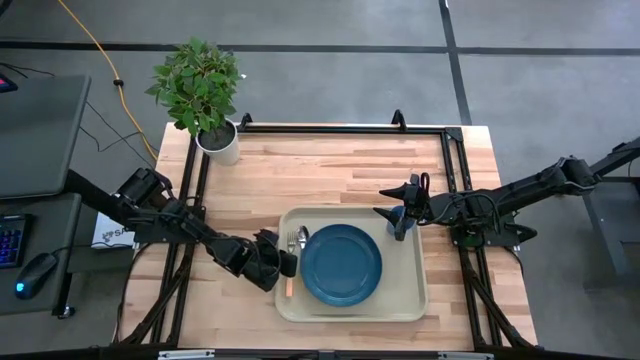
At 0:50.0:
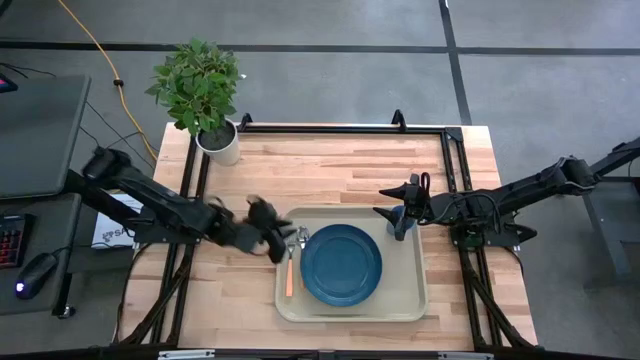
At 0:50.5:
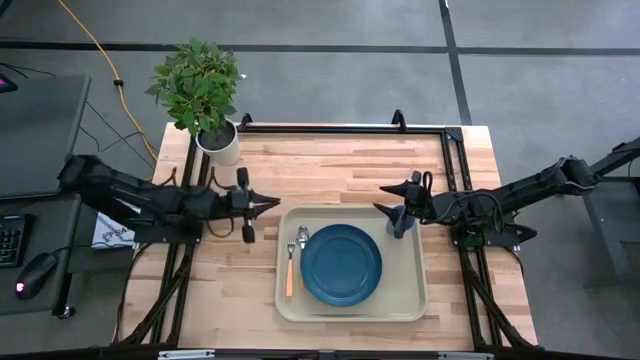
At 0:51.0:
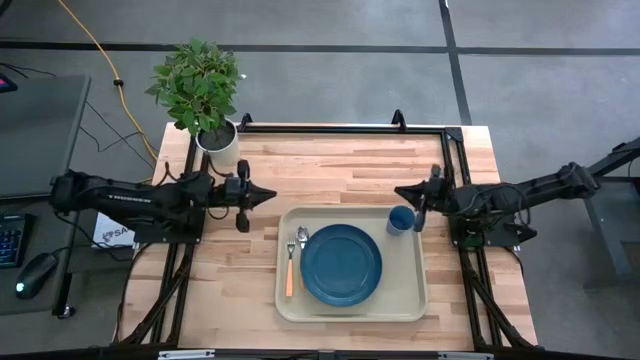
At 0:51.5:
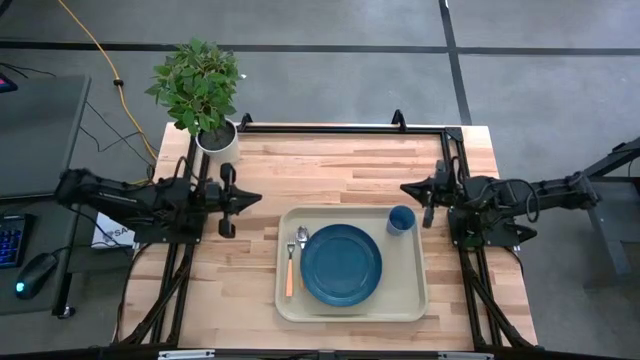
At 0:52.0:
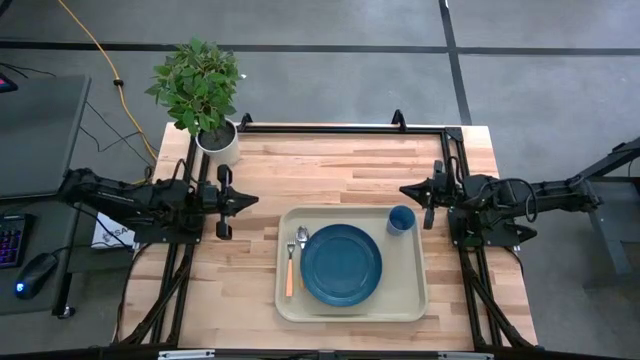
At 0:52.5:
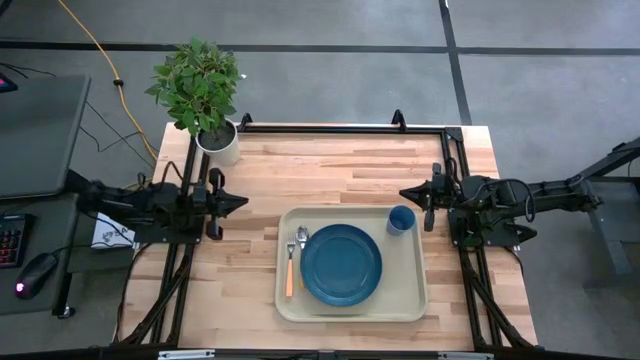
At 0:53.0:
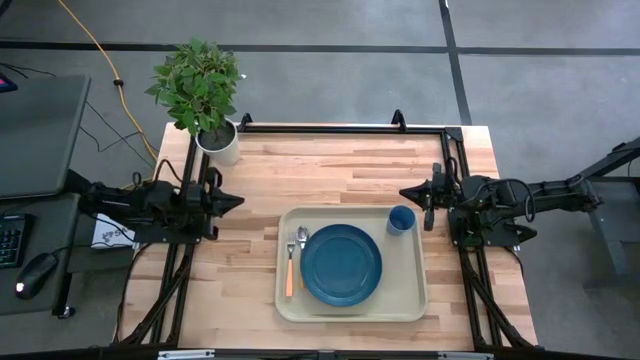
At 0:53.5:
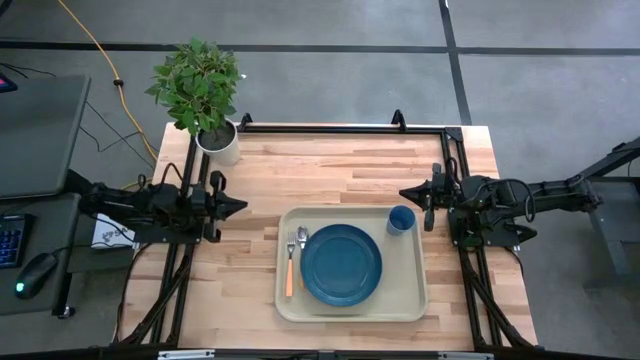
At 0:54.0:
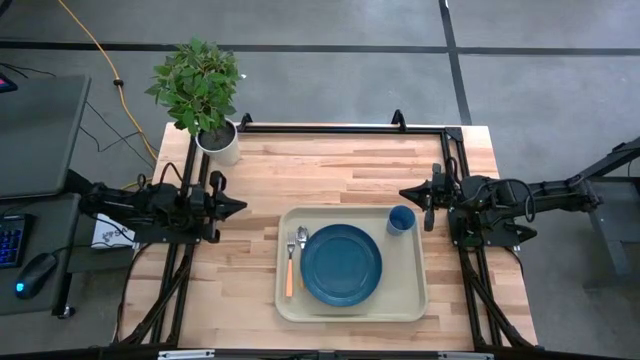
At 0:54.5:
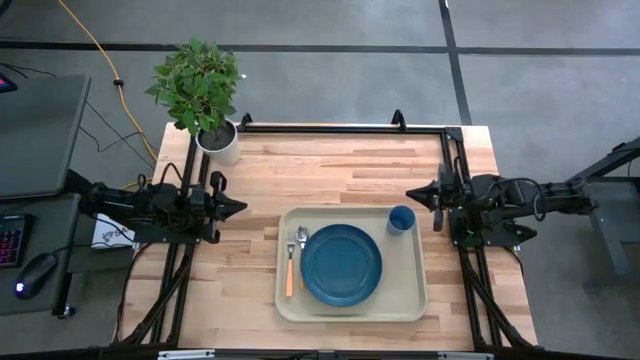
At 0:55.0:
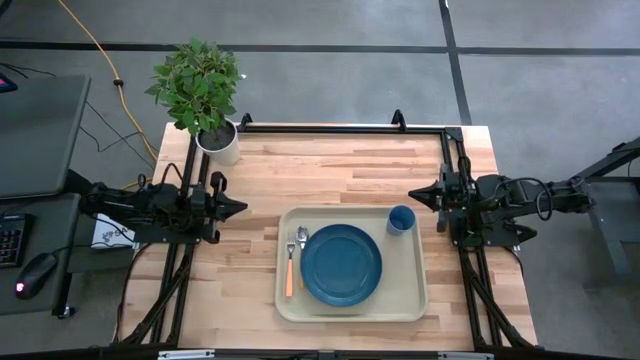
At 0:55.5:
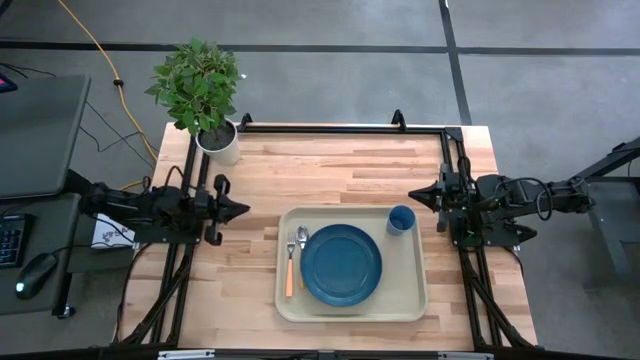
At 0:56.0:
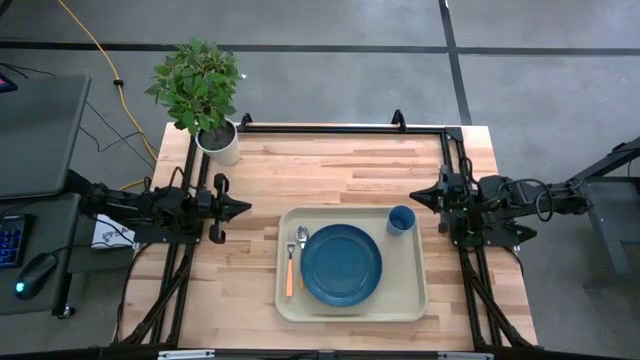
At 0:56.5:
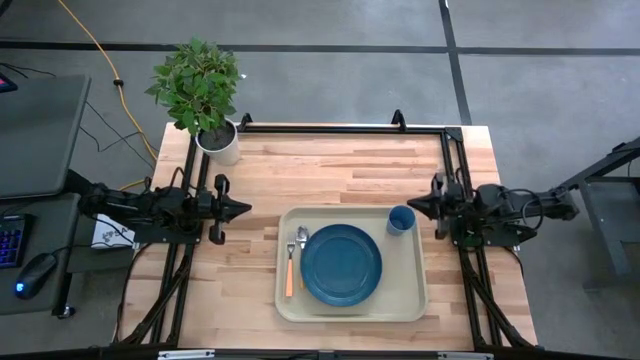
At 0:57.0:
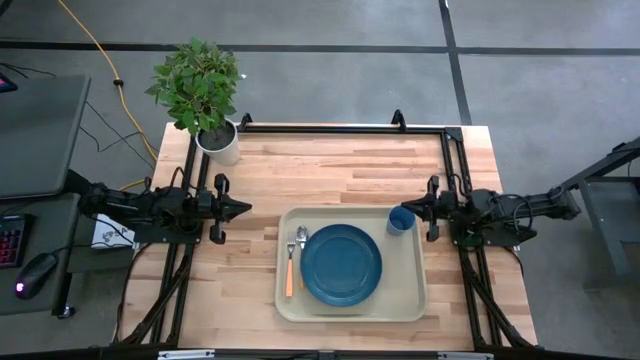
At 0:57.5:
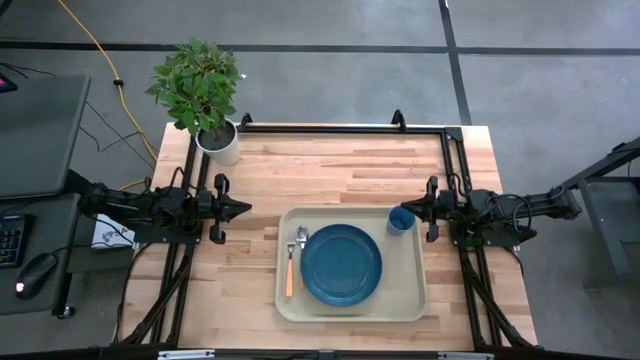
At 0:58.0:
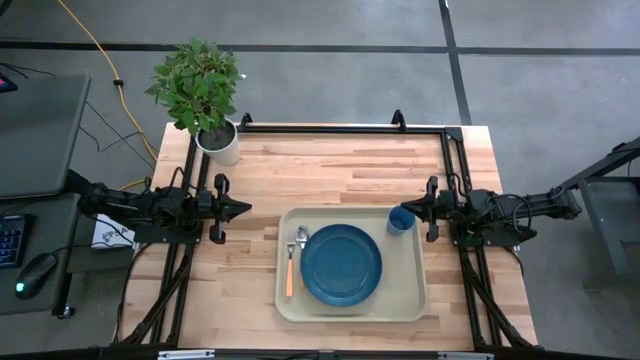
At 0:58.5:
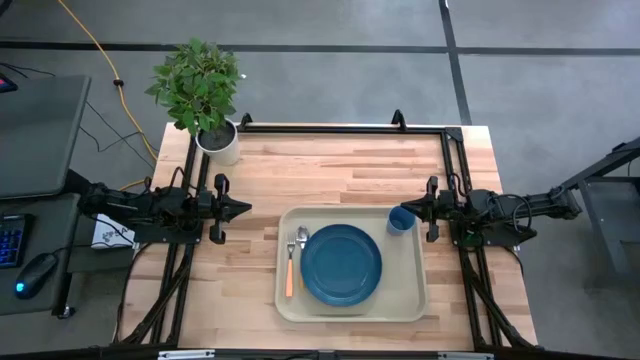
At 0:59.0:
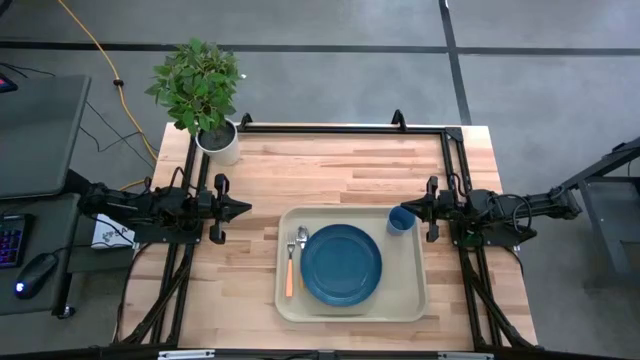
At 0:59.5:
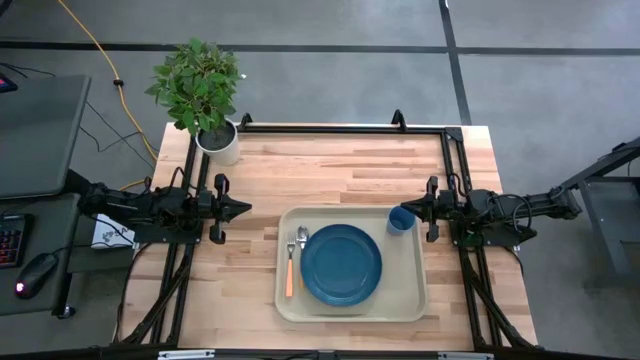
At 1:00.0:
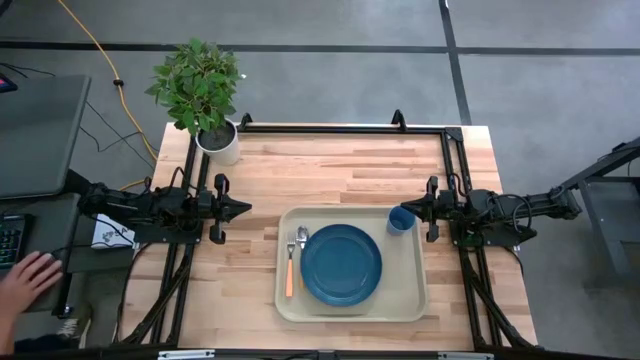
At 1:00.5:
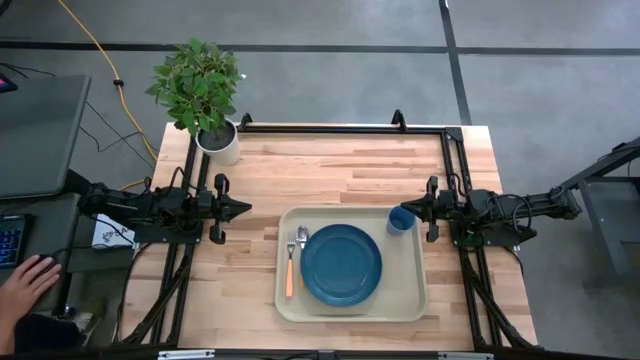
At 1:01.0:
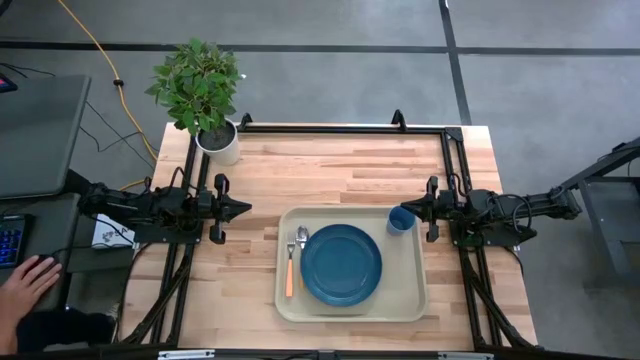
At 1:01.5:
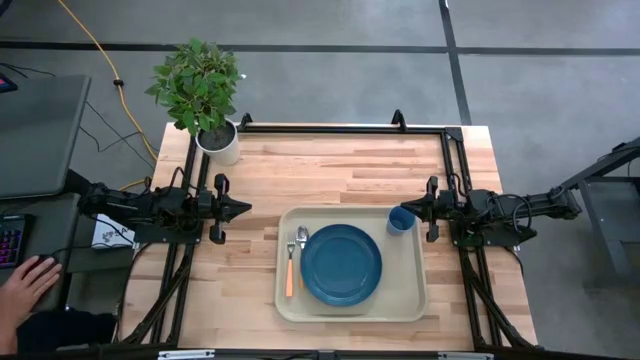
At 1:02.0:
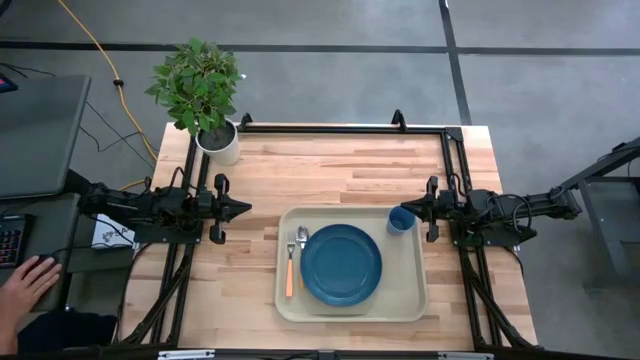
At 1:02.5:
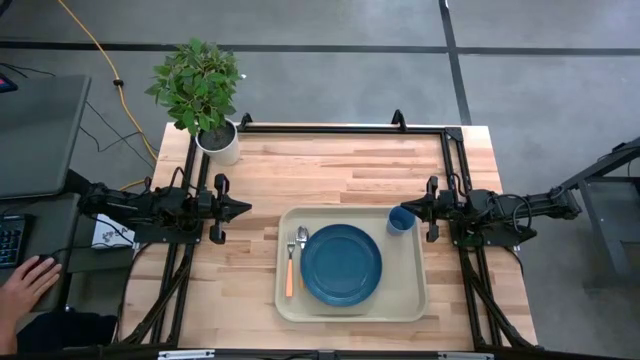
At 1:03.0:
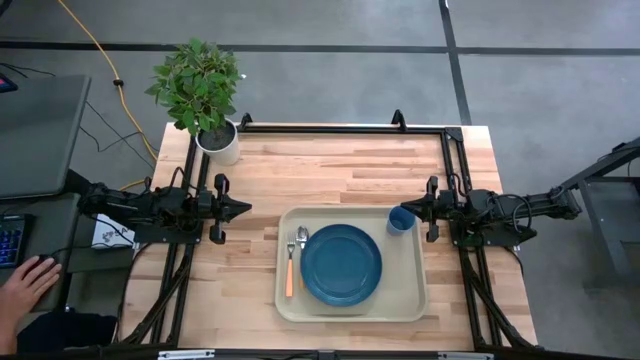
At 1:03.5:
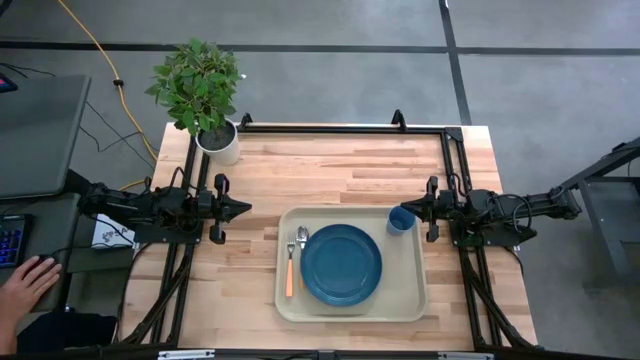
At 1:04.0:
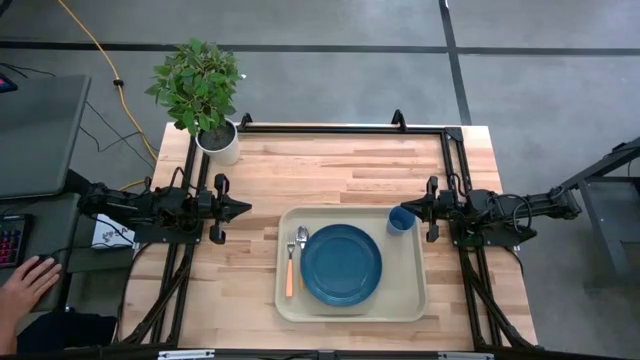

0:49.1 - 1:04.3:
Task: Pick and place plate/cup/fork/spoon on tray
Return to Home Position

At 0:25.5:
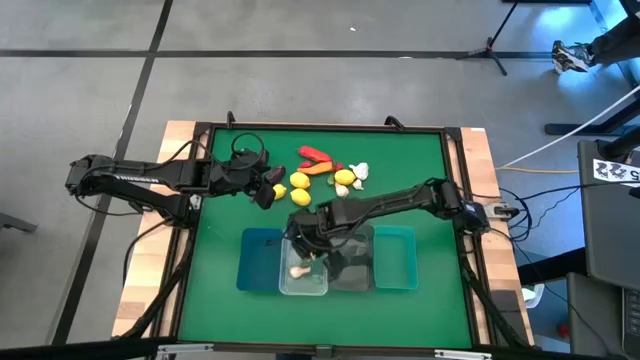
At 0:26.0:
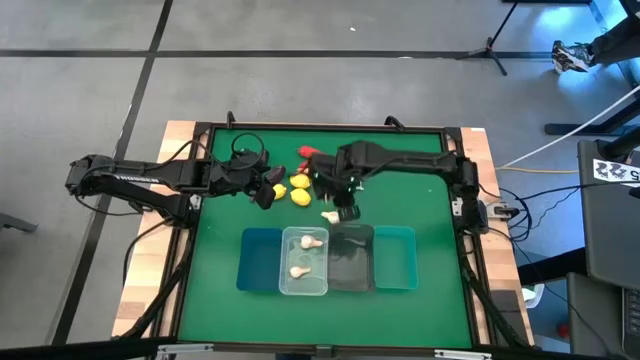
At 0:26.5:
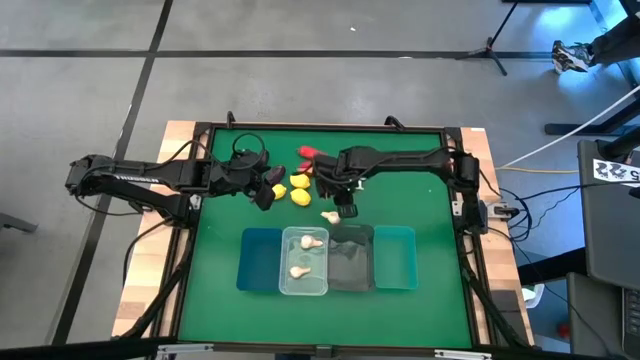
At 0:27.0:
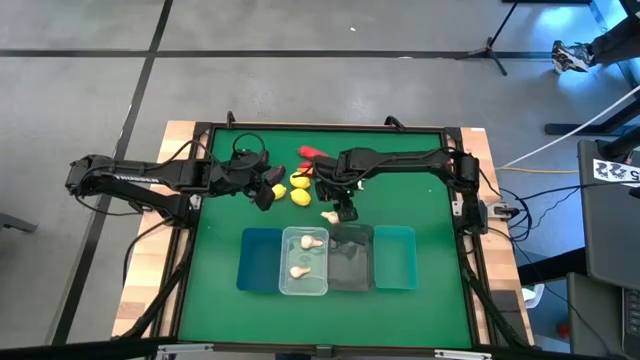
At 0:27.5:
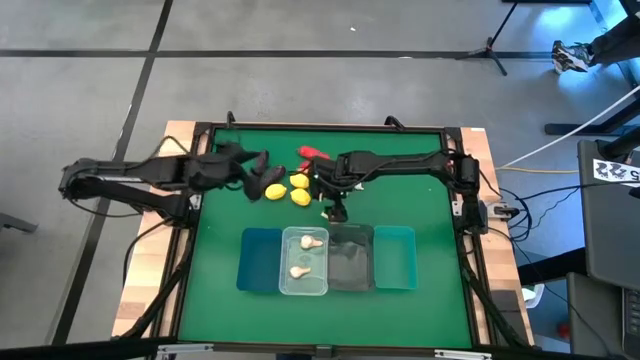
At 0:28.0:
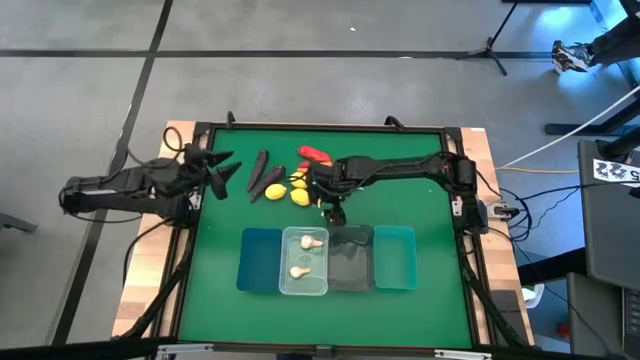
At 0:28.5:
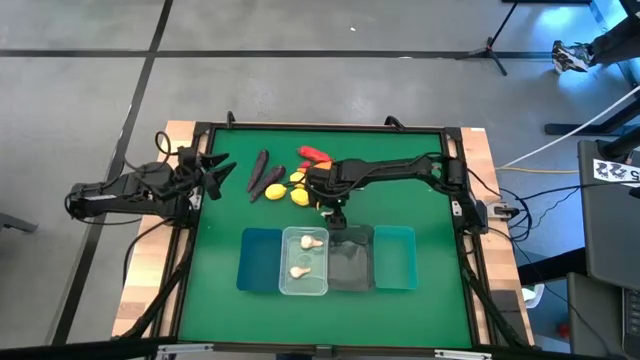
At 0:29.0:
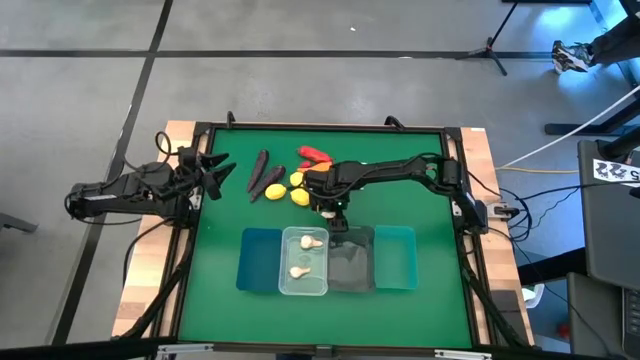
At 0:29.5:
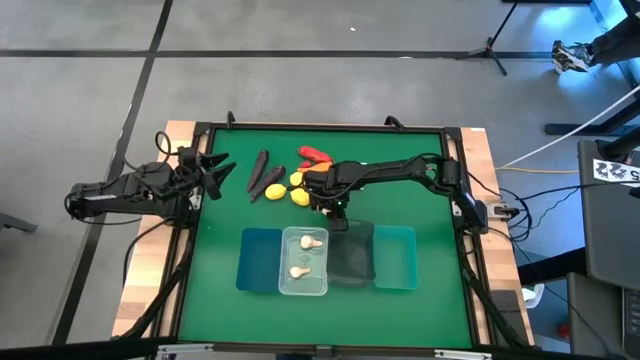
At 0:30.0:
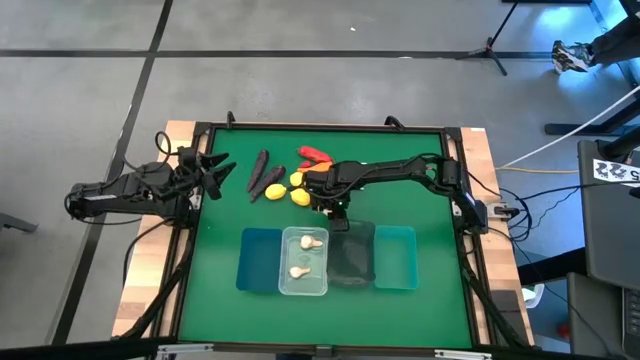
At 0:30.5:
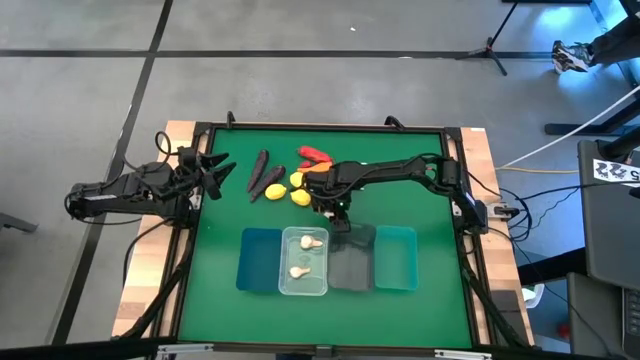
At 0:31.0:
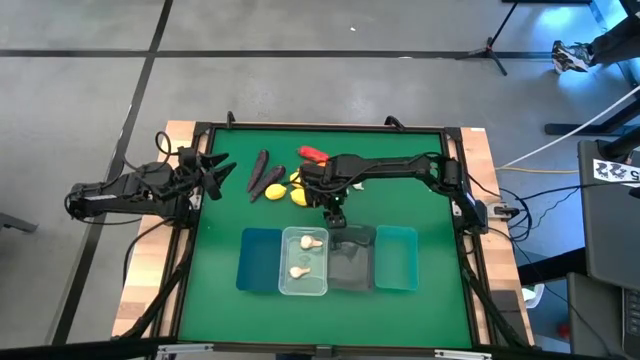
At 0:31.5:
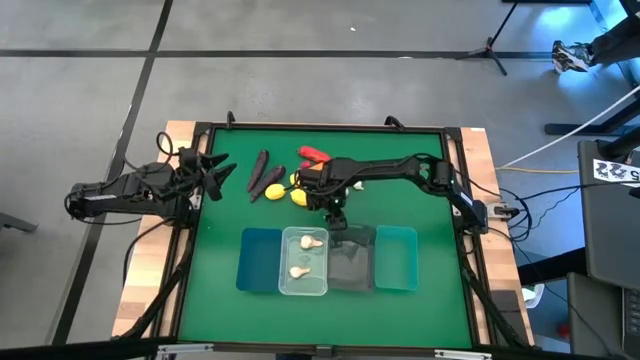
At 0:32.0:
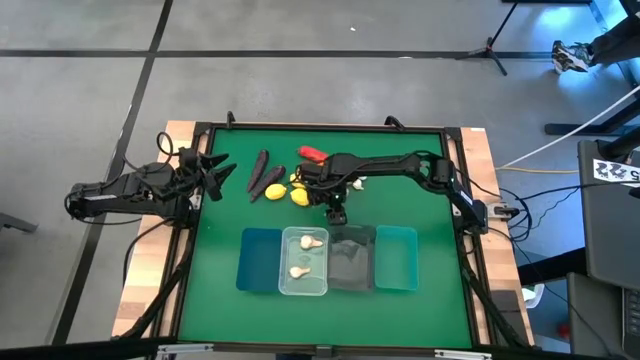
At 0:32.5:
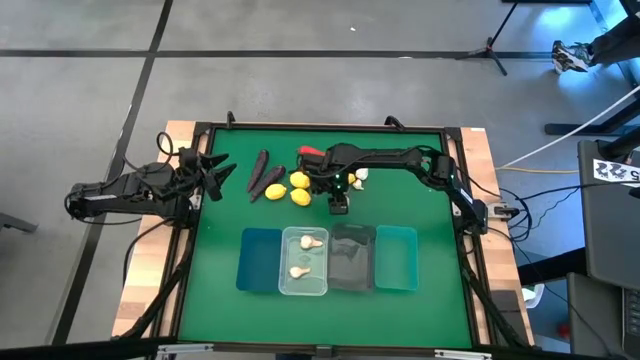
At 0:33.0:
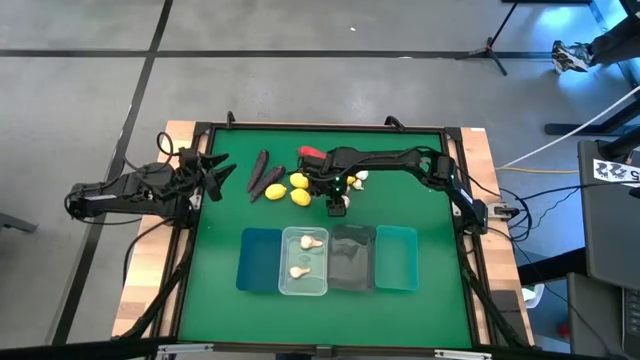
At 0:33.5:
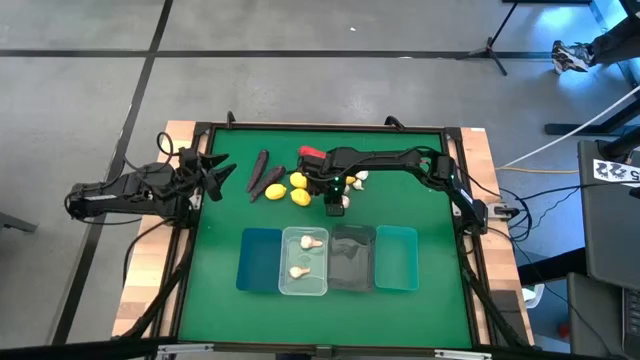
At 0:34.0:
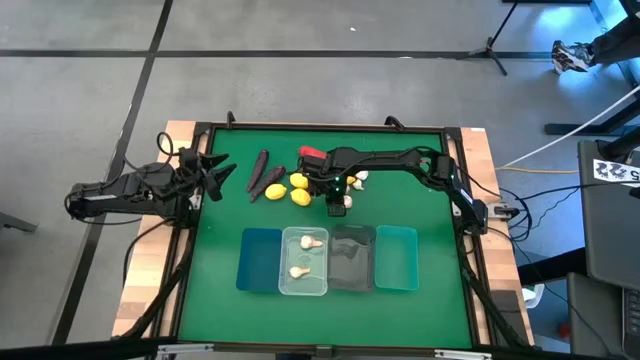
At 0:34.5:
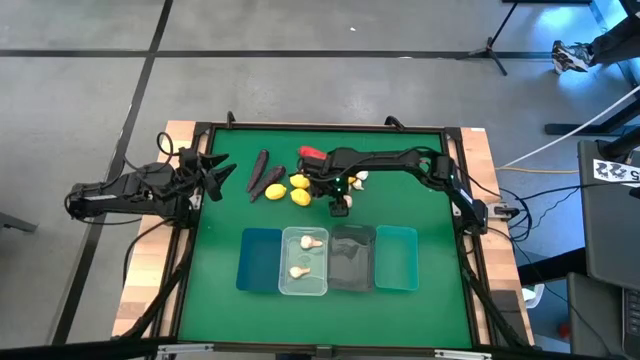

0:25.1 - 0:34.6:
Task: Sort produce into baskets
Put the white garlic into the transparent bin
